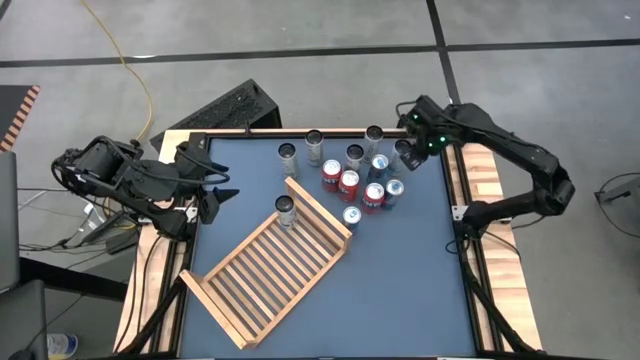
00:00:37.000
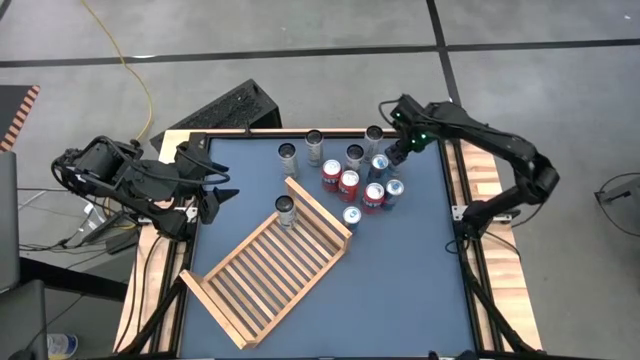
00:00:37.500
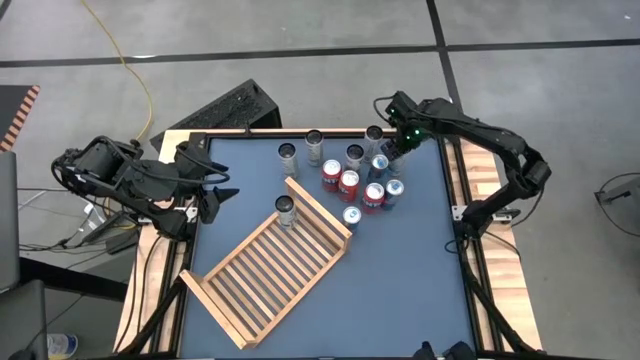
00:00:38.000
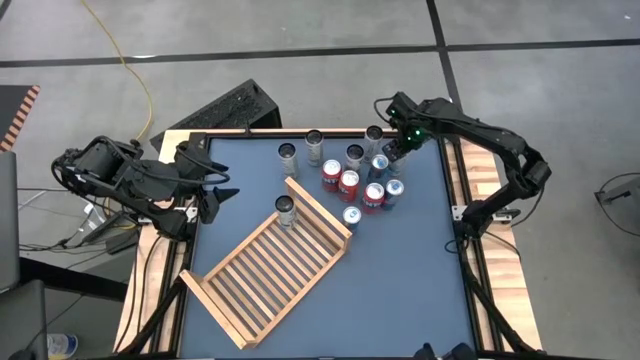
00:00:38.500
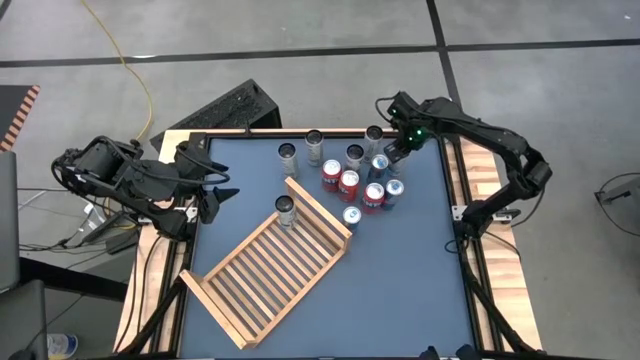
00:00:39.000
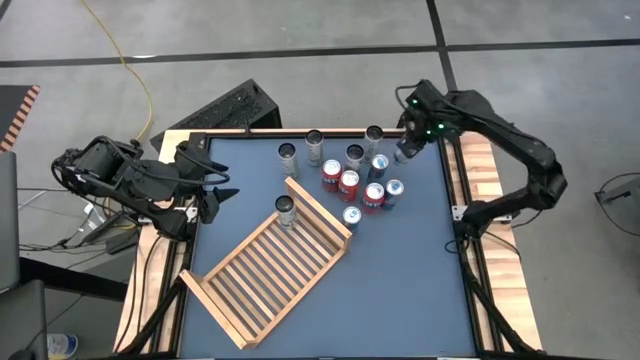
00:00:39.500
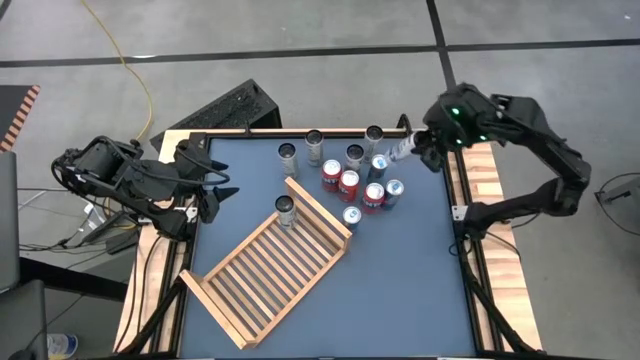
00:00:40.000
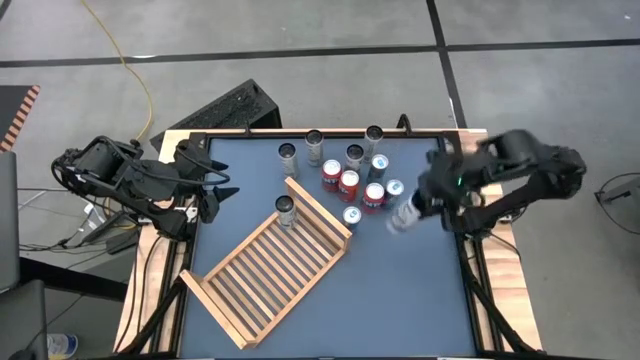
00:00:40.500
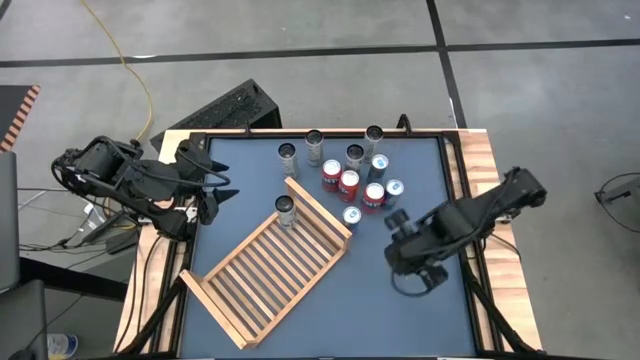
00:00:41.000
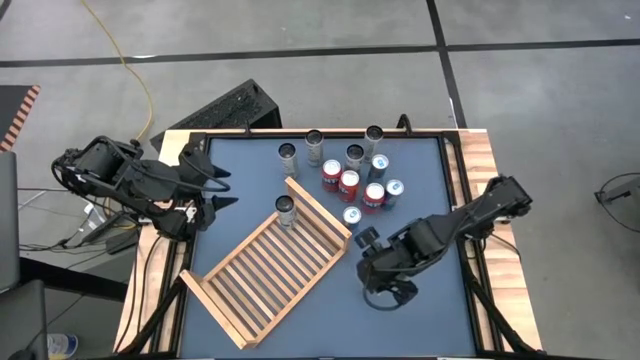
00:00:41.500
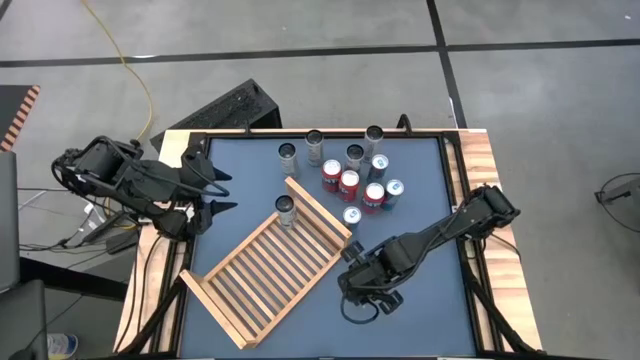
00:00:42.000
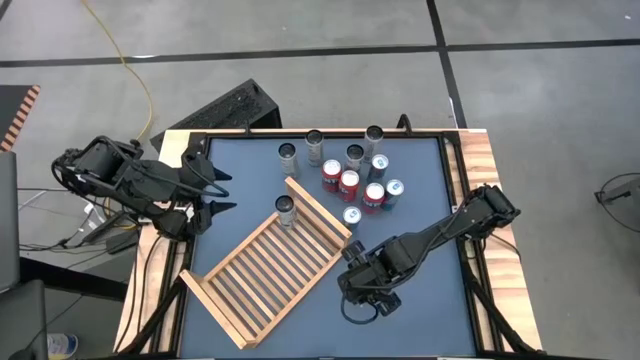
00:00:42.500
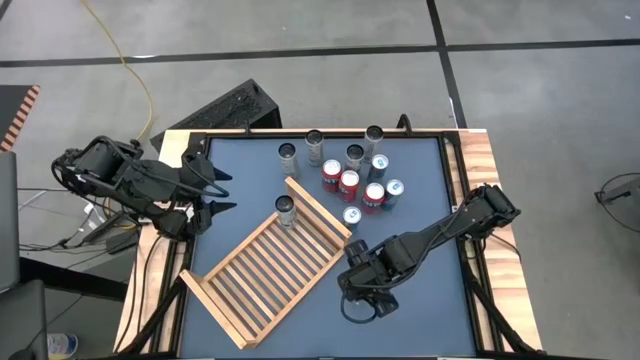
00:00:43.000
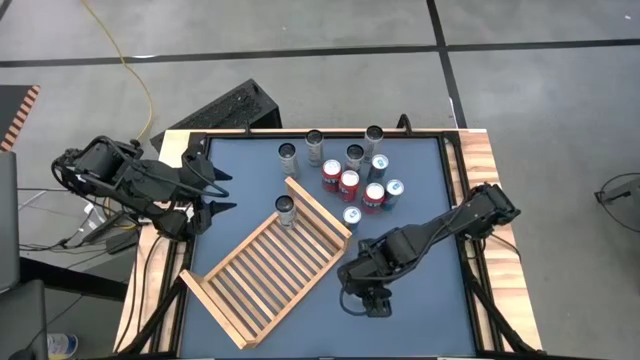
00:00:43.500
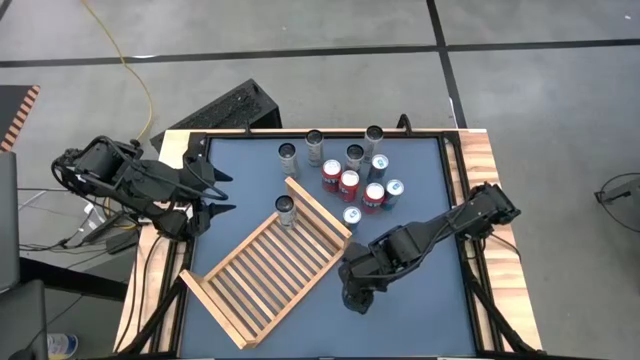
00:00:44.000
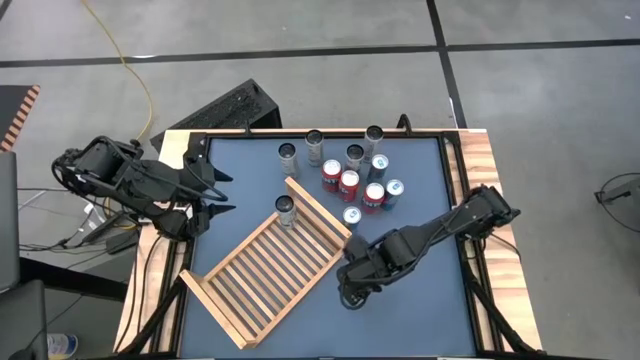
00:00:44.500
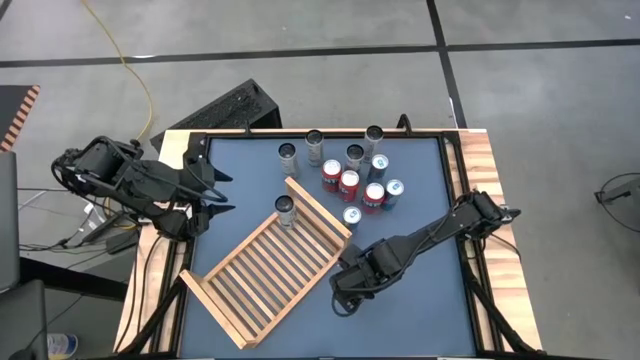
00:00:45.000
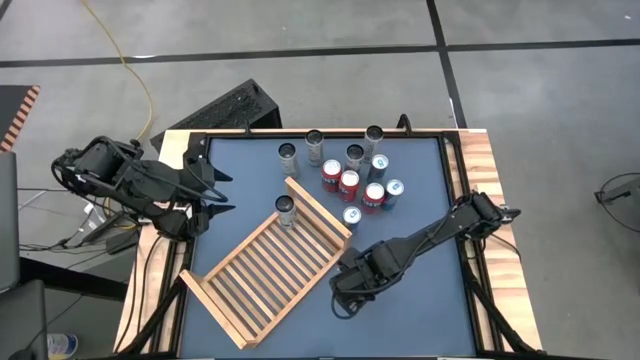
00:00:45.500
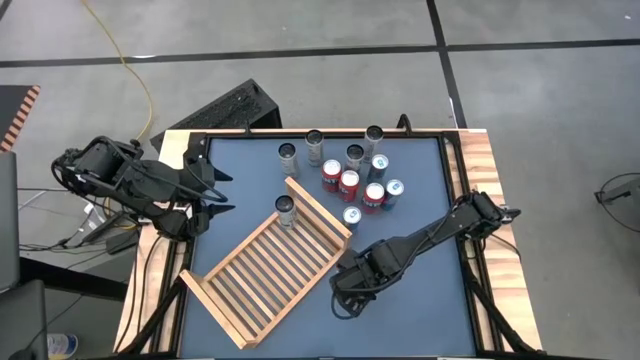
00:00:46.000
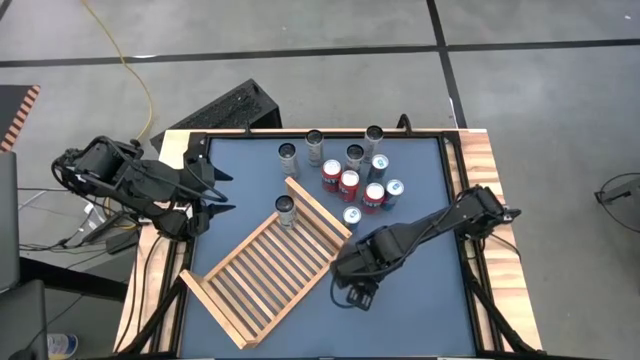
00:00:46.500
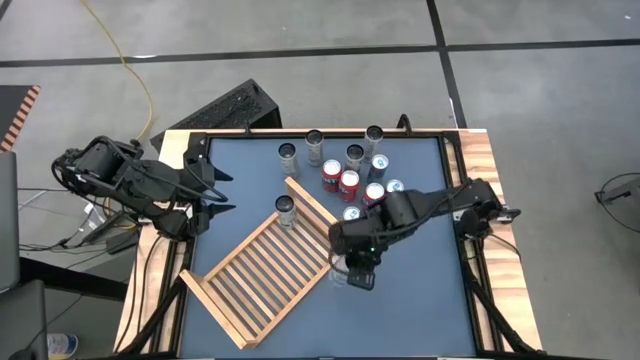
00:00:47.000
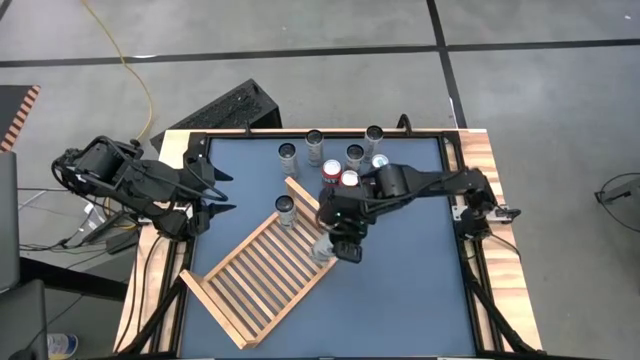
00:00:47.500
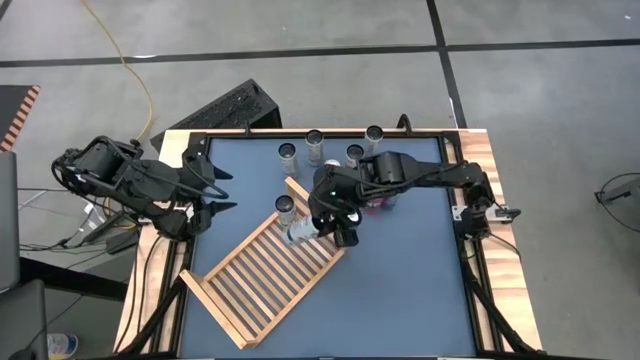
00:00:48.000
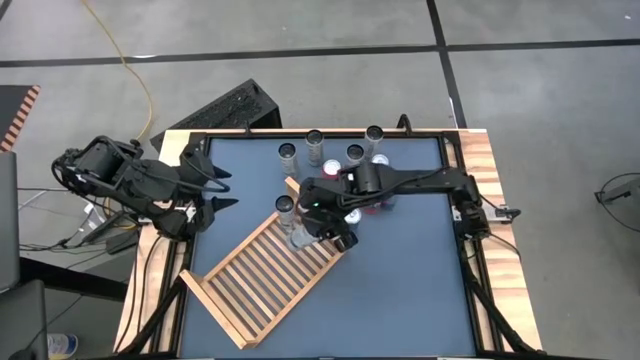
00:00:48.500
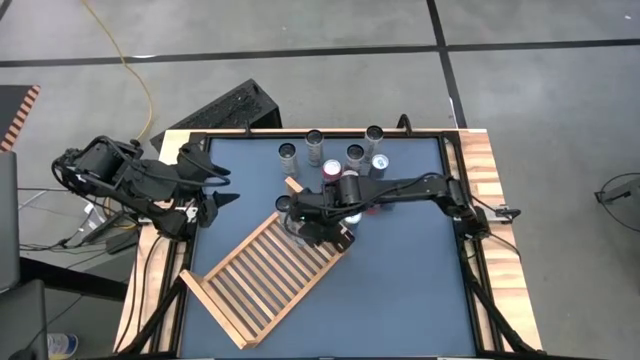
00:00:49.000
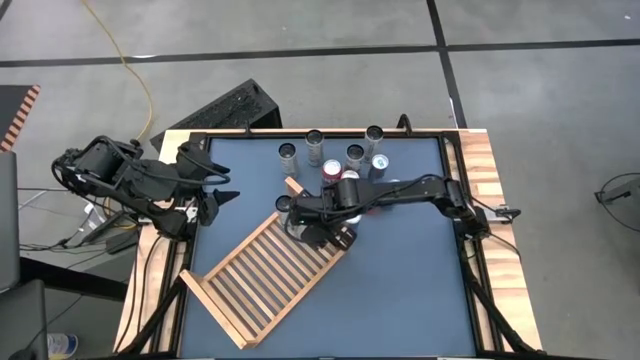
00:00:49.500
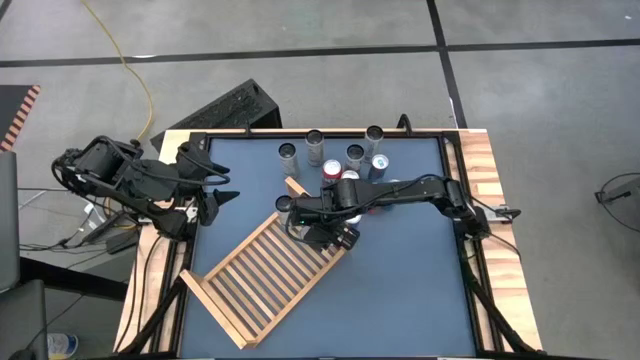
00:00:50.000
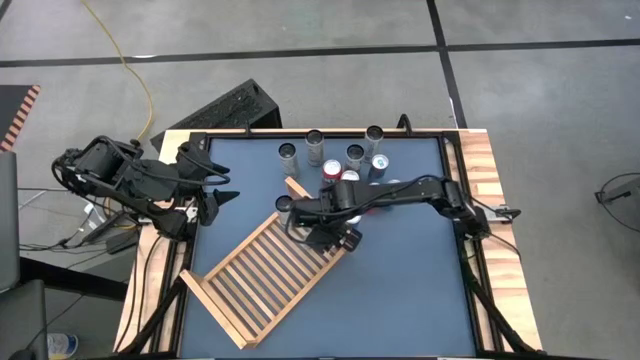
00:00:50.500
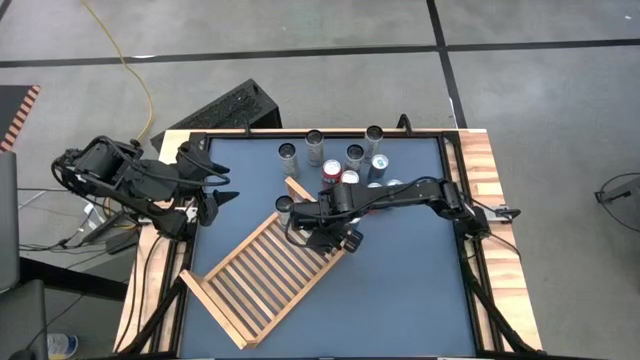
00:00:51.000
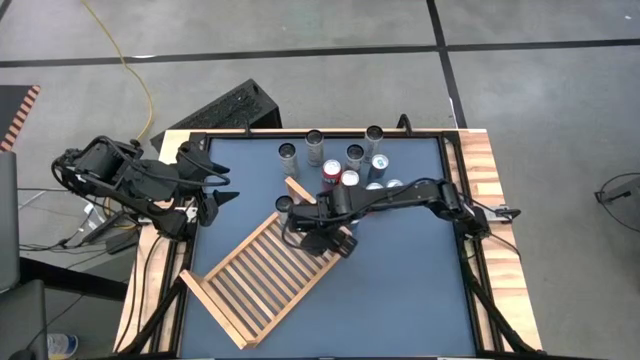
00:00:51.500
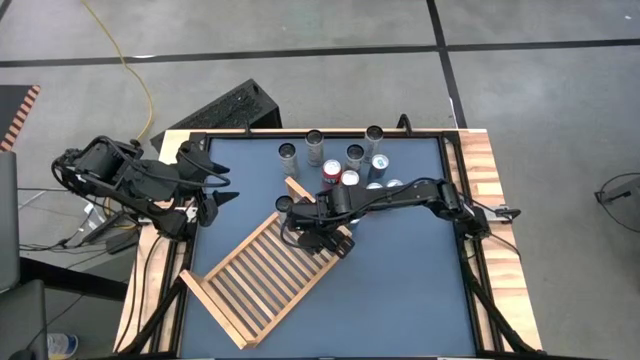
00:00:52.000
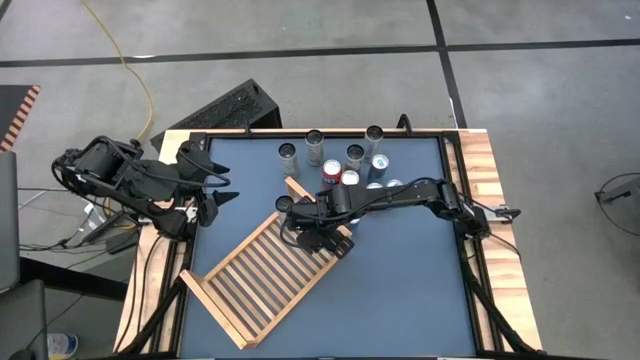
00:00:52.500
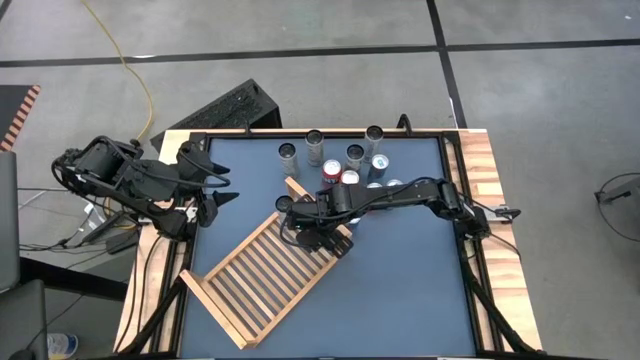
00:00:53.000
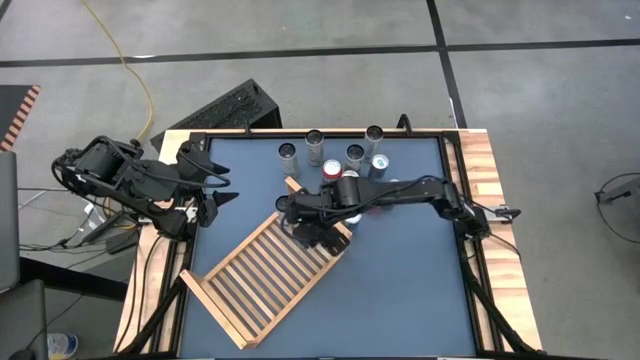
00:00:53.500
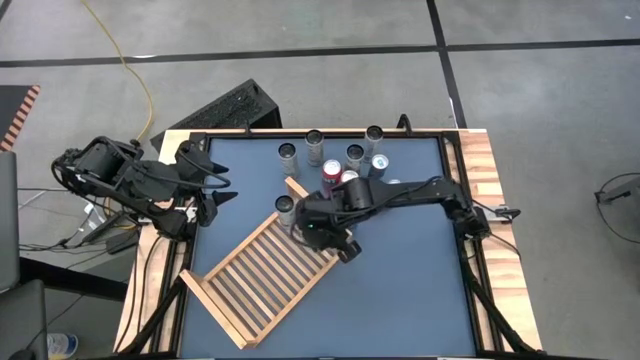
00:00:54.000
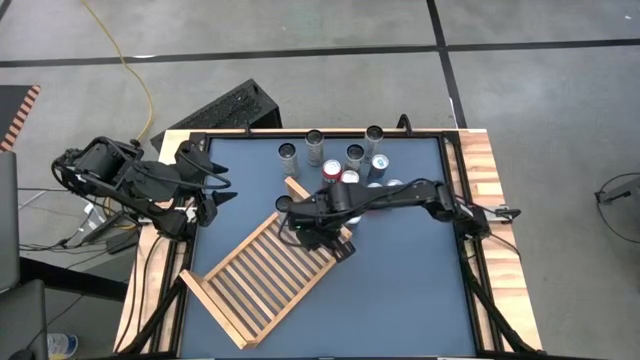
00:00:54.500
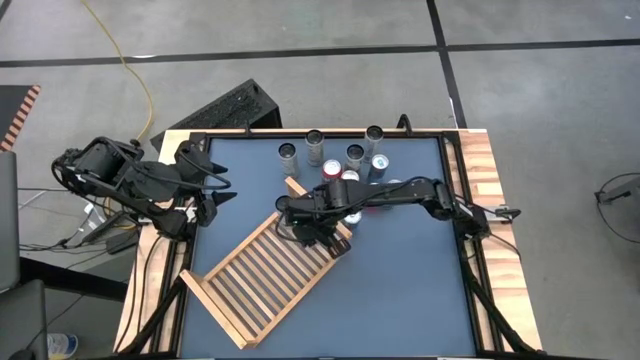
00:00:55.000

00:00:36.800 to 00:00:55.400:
Task: Place canned beverage on shelf
Put the right white blue soda can on the shelf aligned with the other white blue soda can

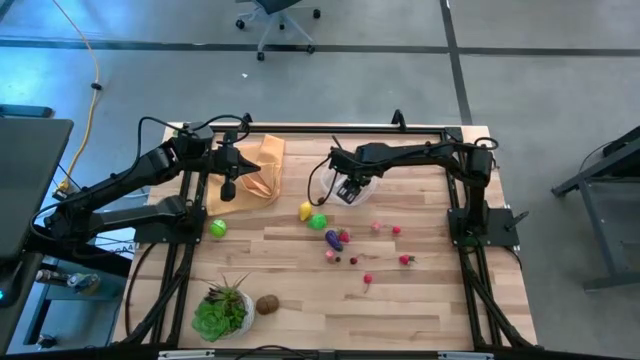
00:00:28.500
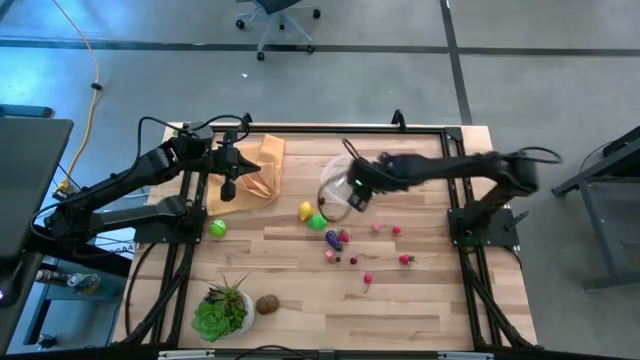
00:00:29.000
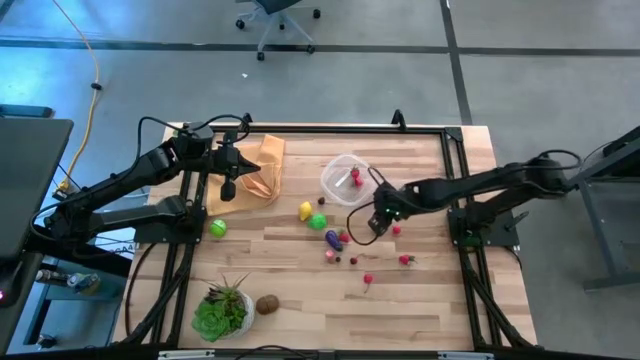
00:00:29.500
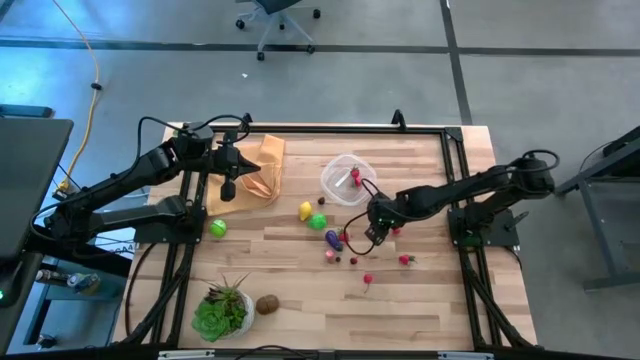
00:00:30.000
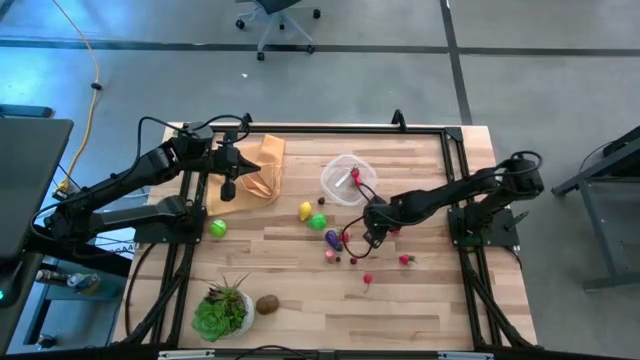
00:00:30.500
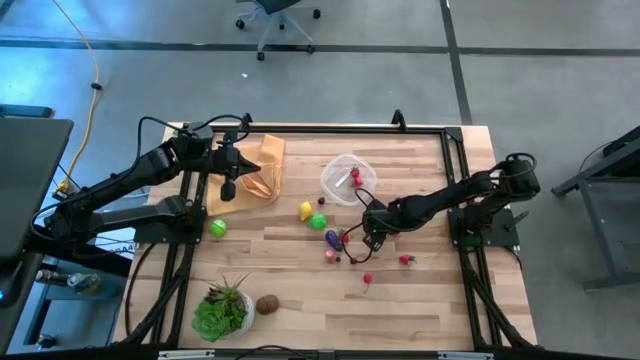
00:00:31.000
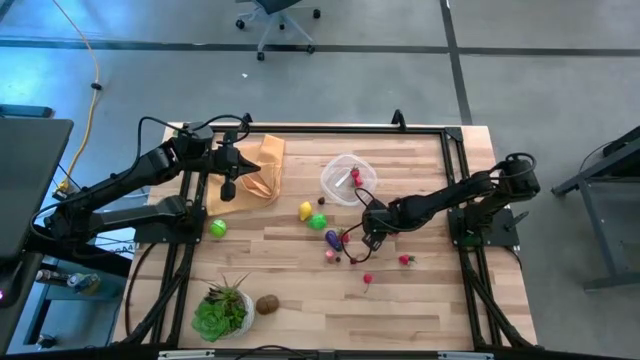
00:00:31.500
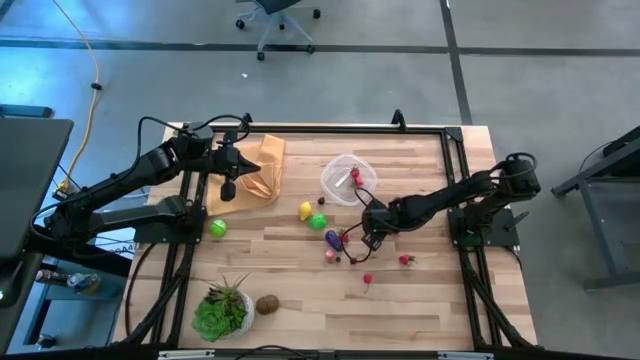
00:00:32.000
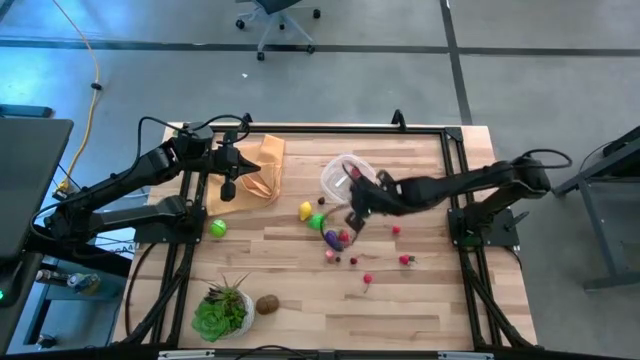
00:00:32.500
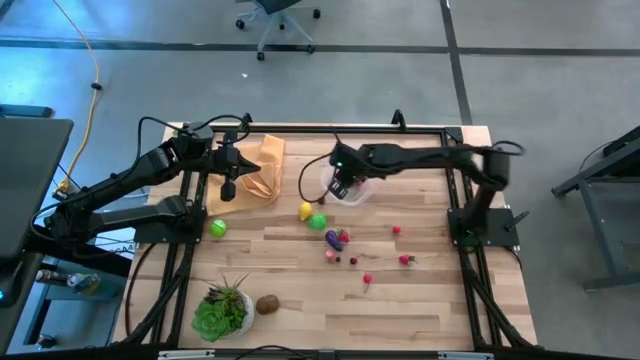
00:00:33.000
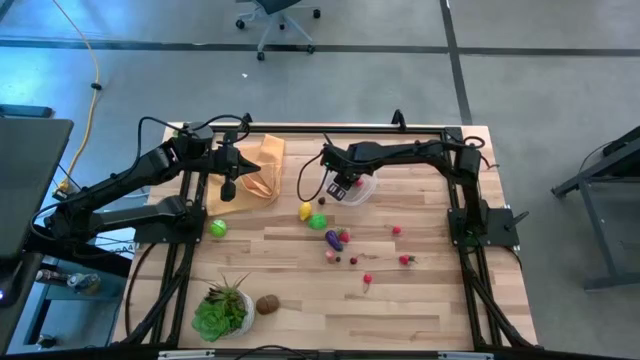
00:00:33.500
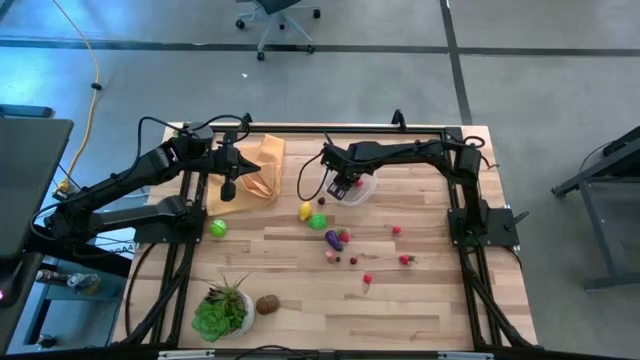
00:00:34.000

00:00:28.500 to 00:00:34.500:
Task: Pick and placing Produce into tupperware
Put the pink peach into the transparent container
